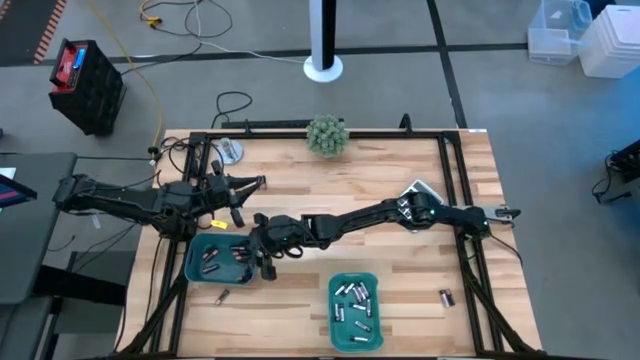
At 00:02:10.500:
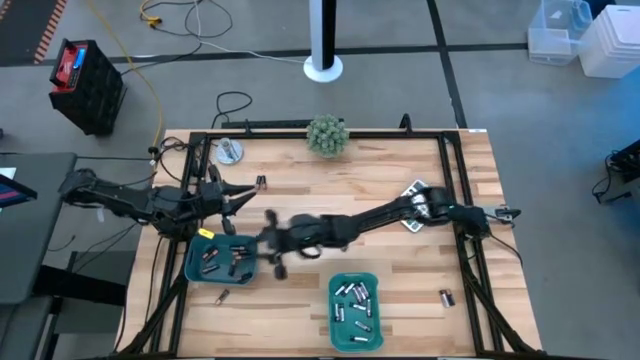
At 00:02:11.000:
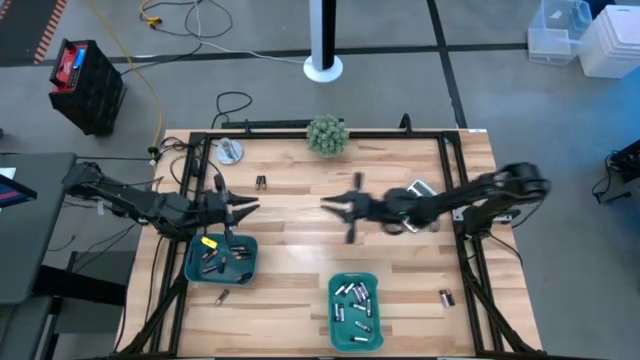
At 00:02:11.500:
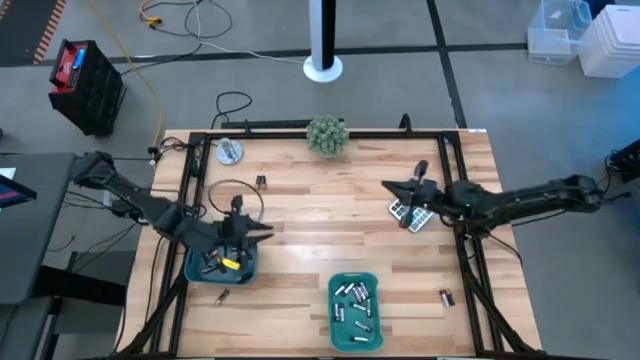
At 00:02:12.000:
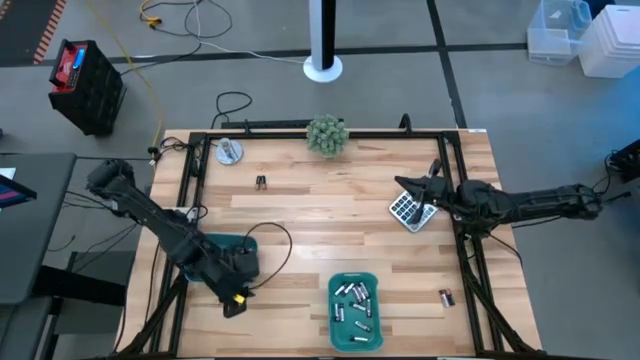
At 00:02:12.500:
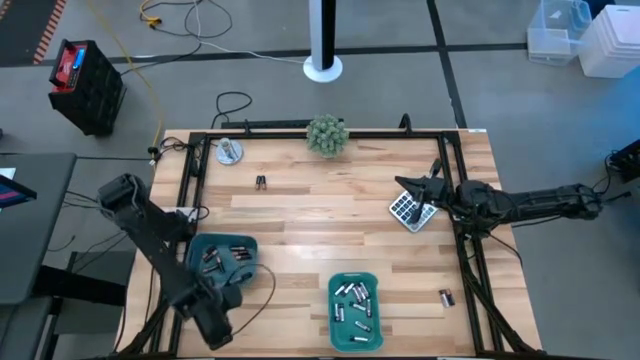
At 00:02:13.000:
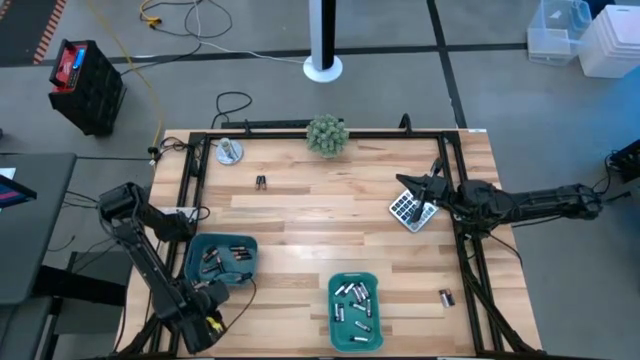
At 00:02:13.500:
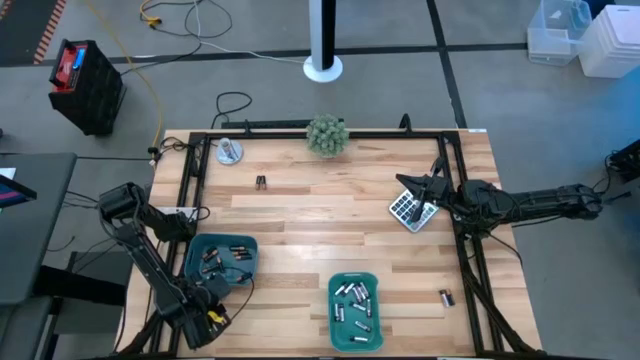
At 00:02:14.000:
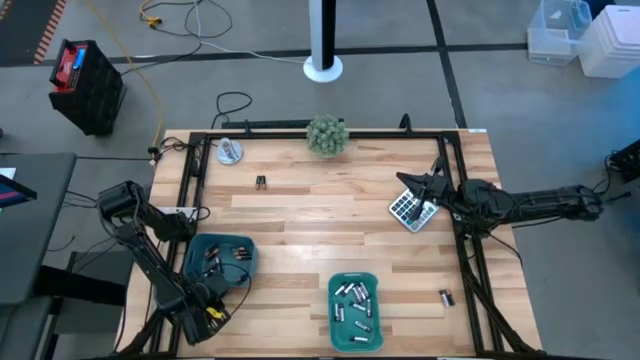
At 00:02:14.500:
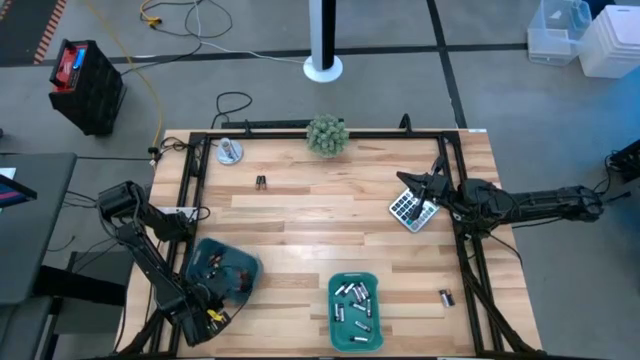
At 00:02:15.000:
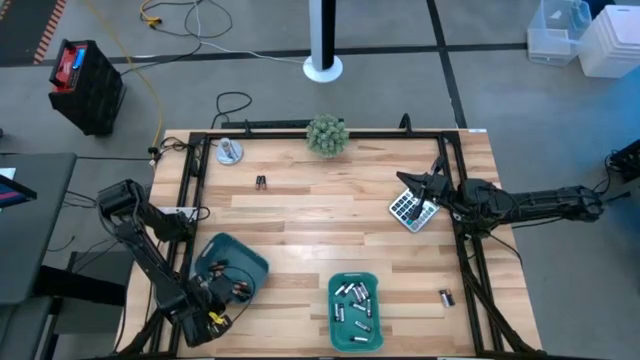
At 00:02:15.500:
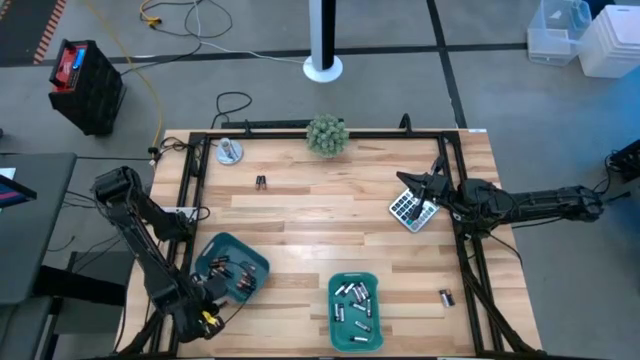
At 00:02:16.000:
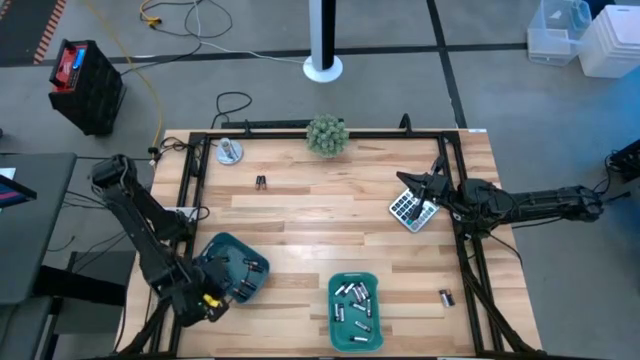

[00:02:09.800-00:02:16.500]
Task: Sort batteries
Put the black battery into the blue bin

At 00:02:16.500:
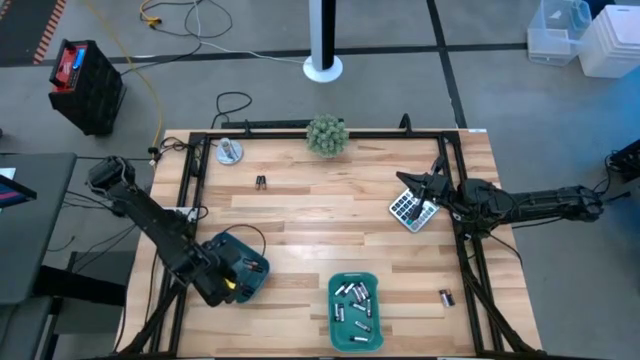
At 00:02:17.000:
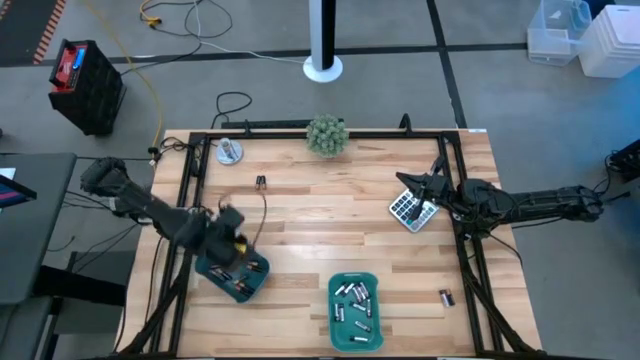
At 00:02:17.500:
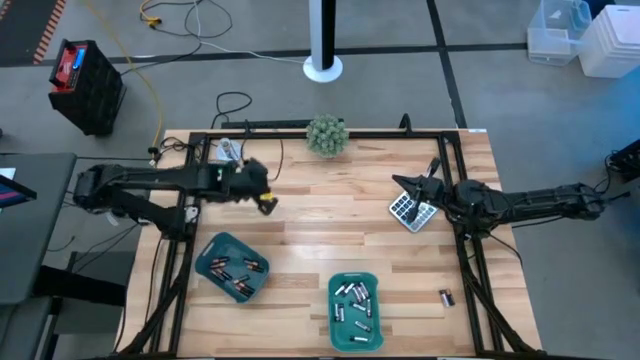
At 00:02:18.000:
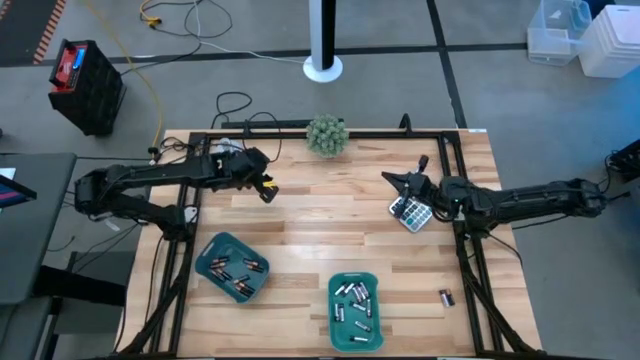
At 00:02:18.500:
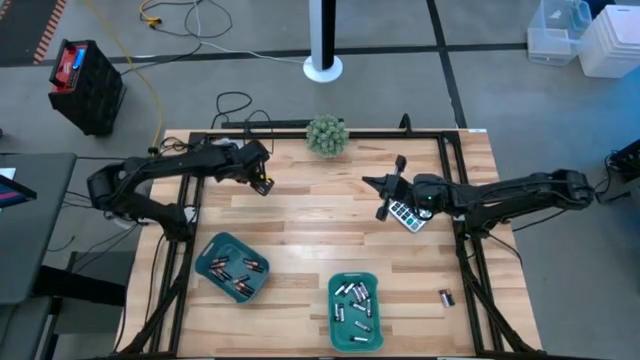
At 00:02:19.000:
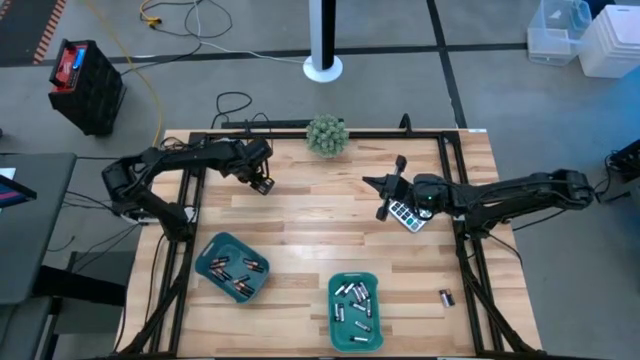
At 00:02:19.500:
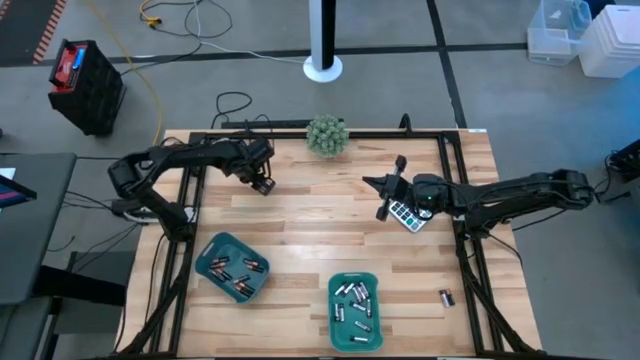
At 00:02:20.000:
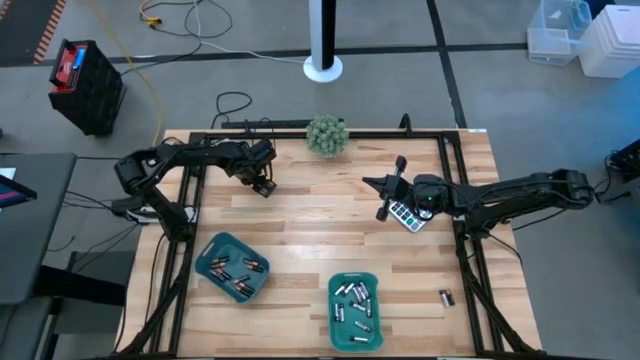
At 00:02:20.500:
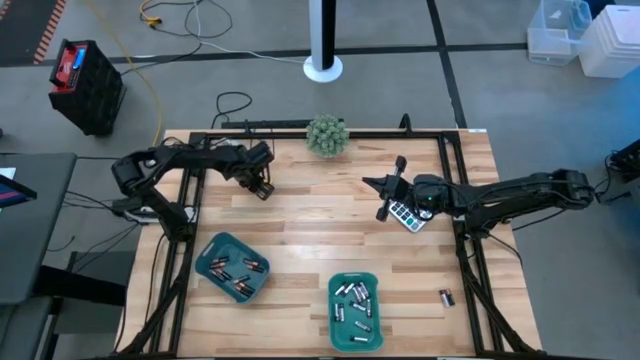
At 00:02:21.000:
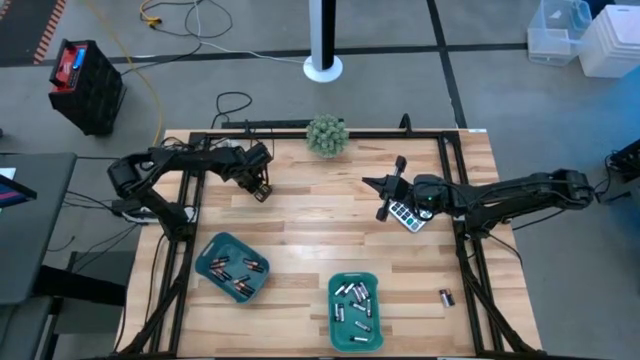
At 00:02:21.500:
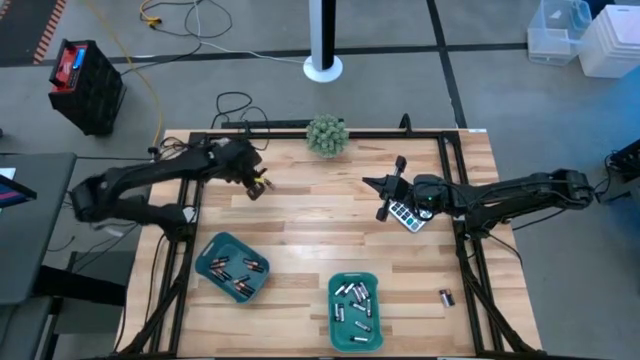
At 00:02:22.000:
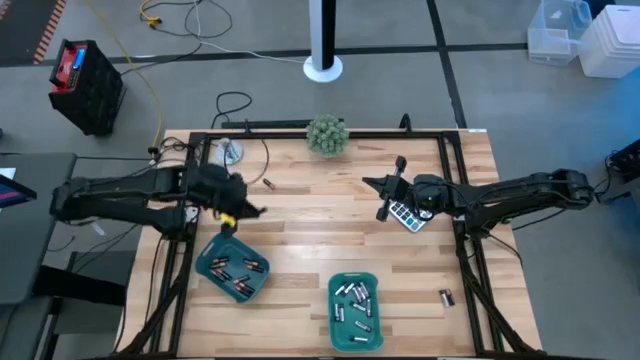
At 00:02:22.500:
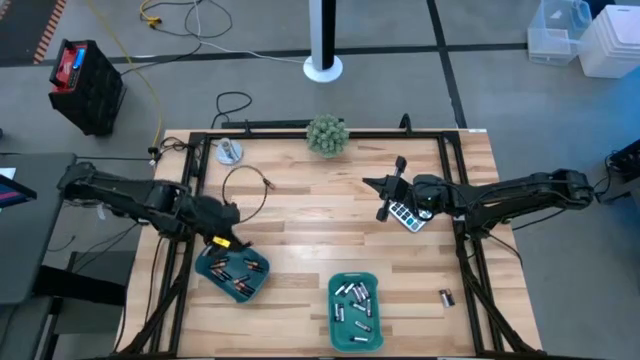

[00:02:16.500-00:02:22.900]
Put the black battery into the blue bin

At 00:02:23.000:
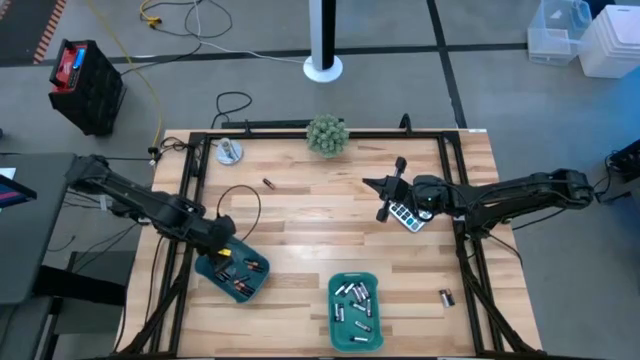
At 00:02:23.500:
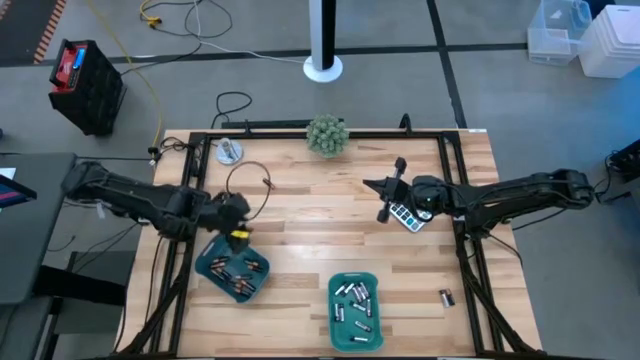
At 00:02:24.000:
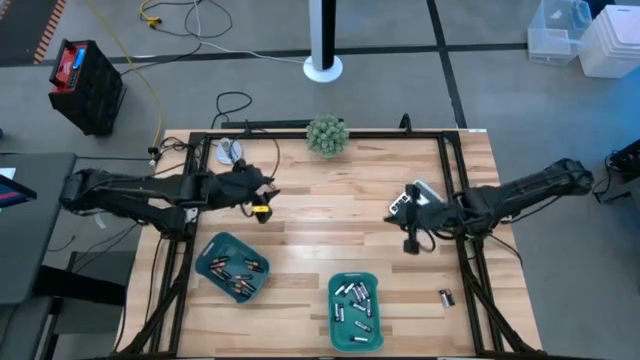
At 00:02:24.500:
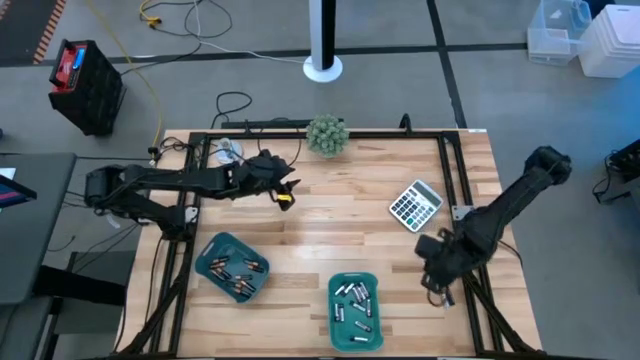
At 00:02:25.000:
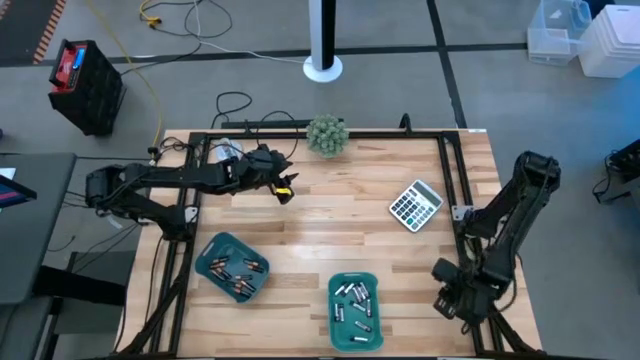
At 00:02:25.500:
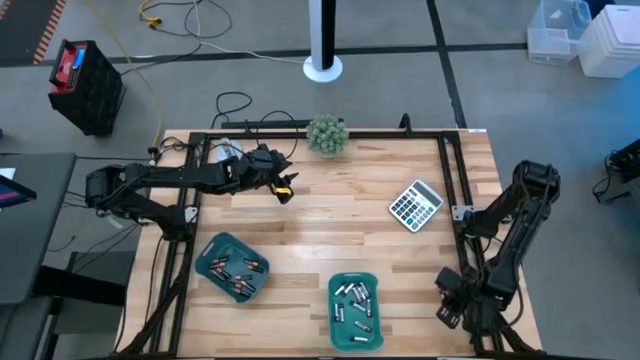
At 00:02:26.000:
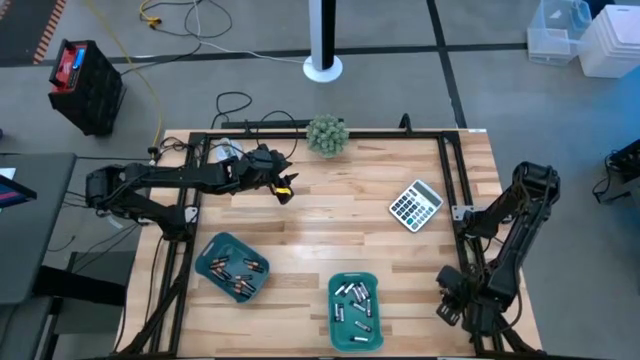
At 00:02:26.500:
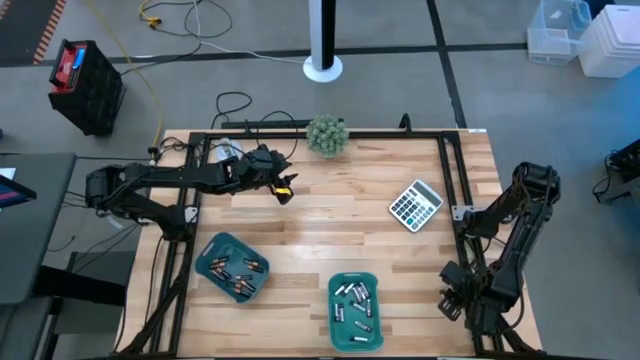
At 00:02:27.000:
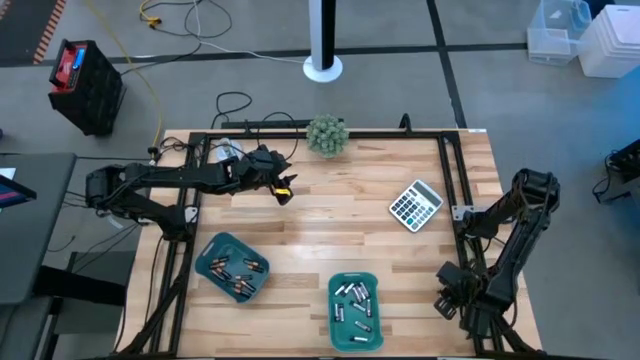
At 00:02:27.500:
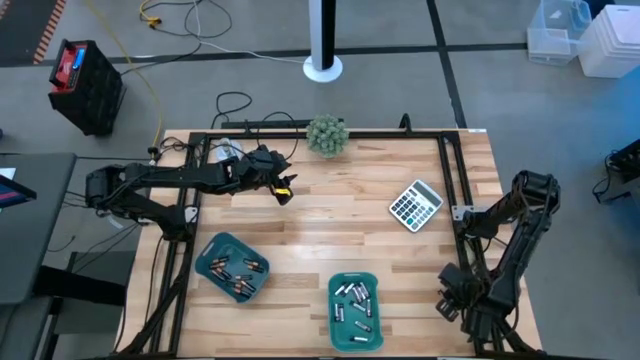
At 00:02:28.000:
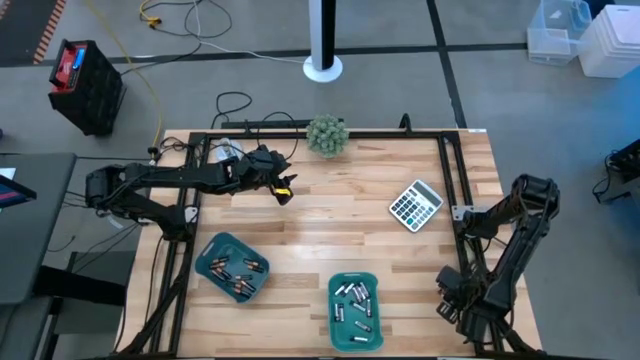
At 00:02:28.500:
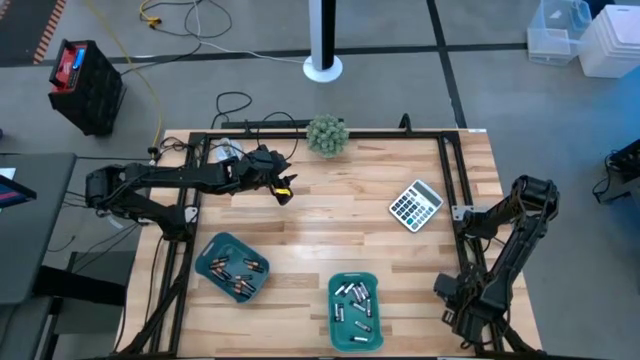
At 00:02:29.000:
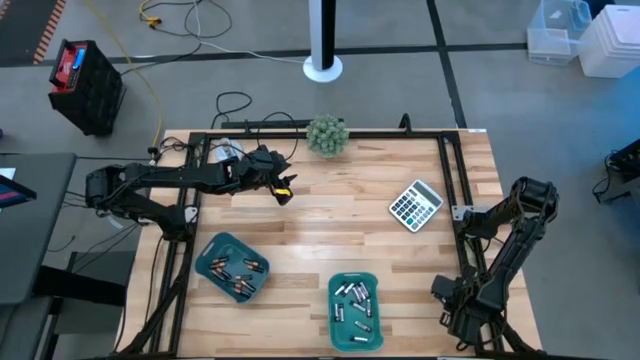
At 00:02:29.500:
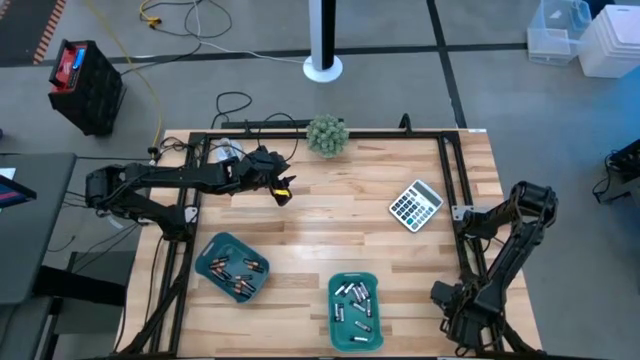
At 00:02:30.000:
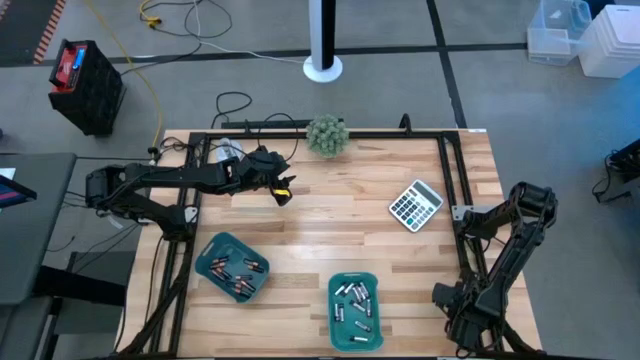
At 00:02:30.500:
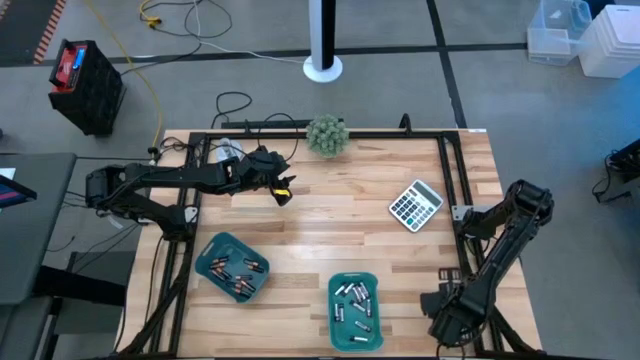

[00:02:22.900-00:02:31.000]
Put the black battery into the blue bin
